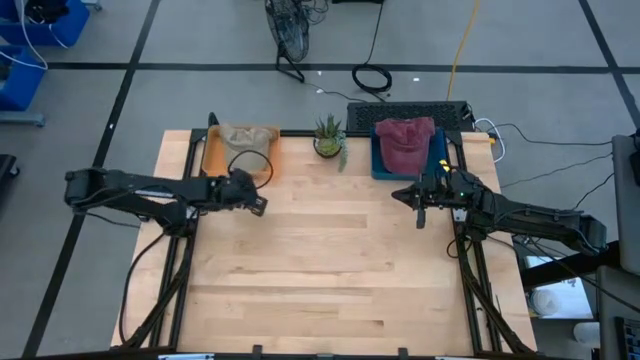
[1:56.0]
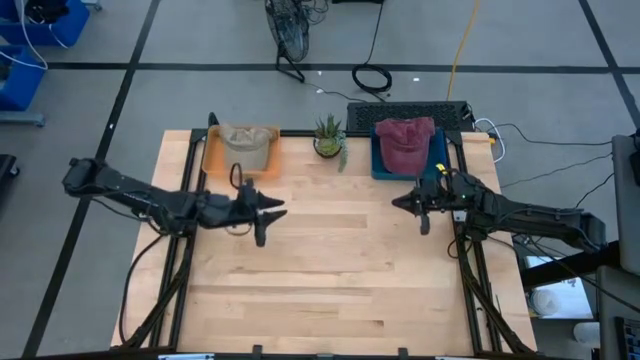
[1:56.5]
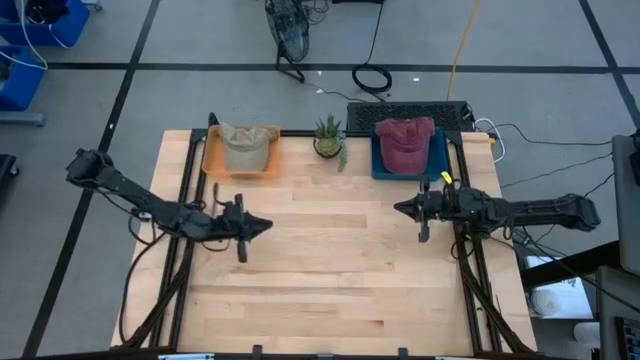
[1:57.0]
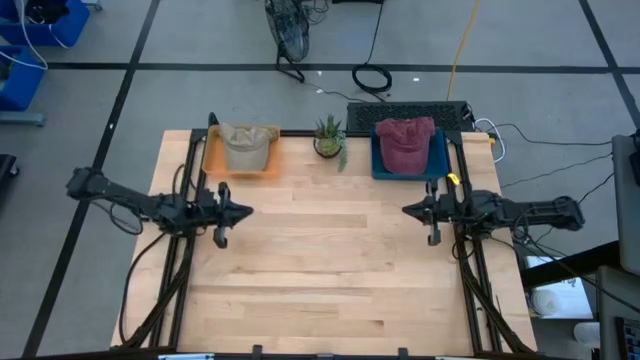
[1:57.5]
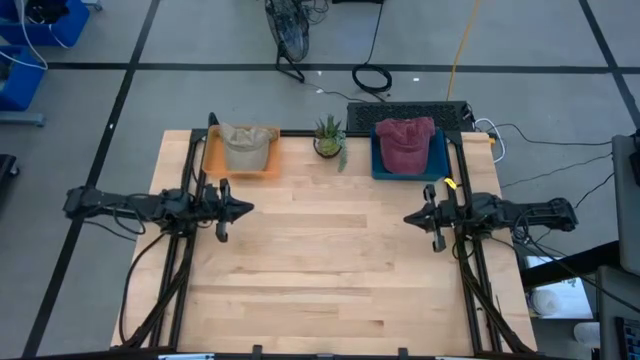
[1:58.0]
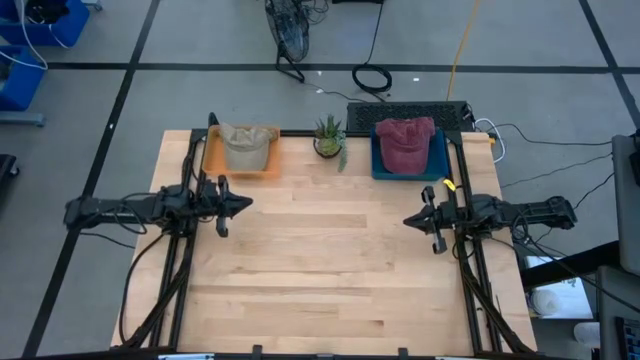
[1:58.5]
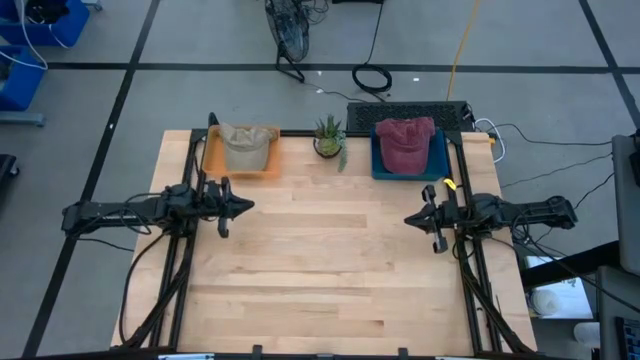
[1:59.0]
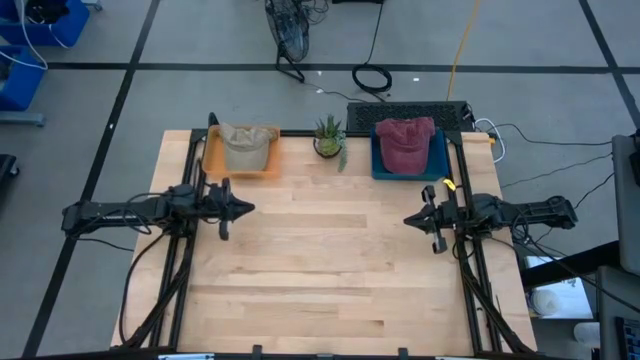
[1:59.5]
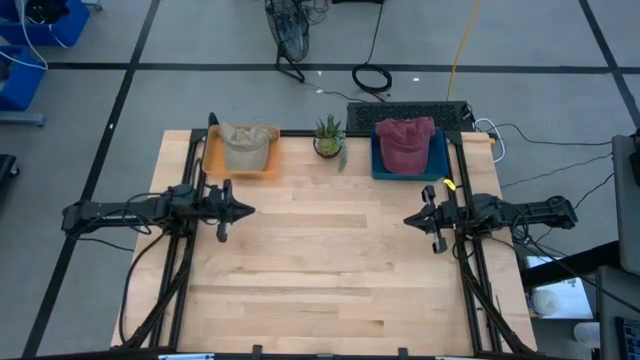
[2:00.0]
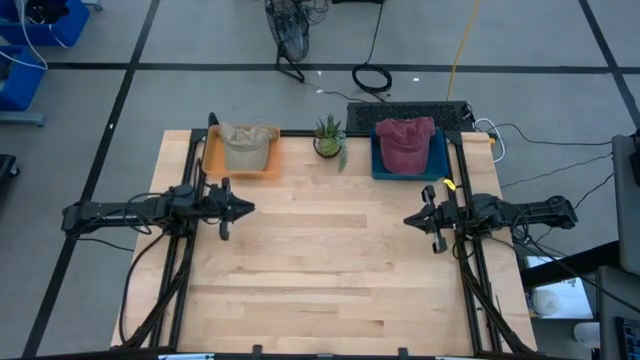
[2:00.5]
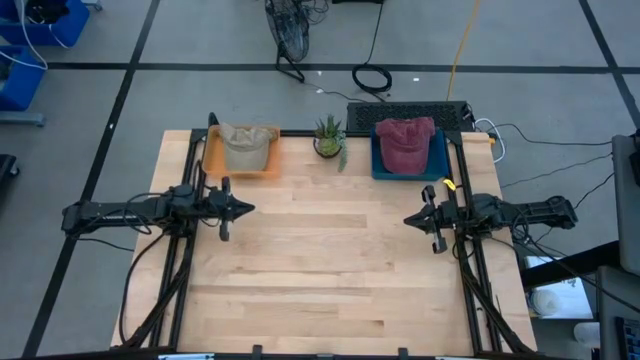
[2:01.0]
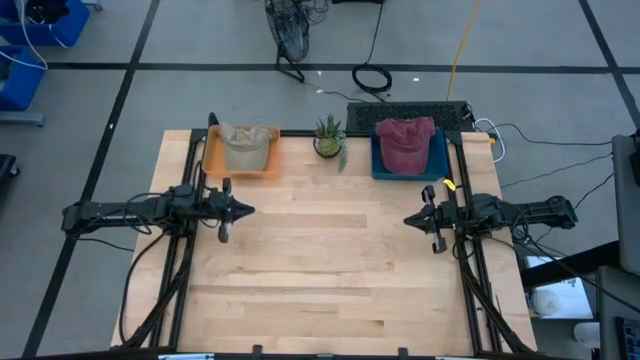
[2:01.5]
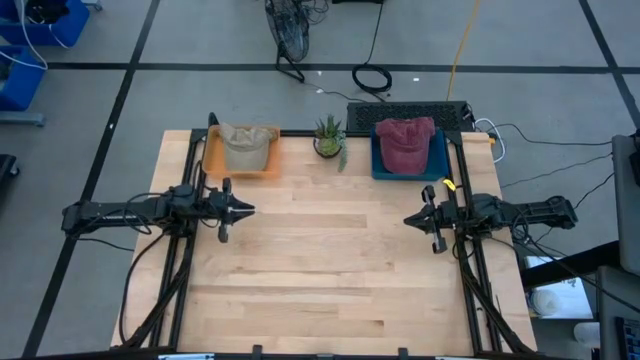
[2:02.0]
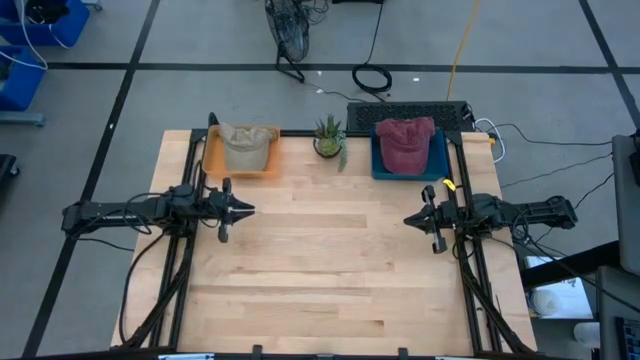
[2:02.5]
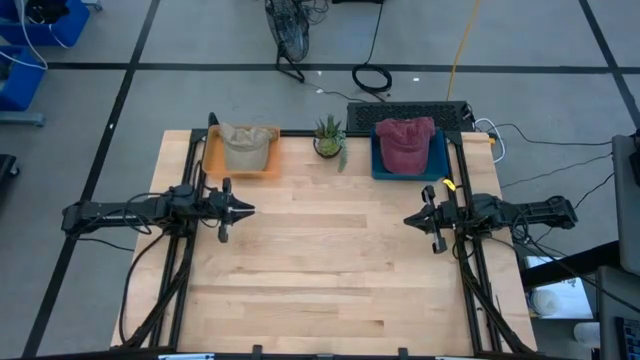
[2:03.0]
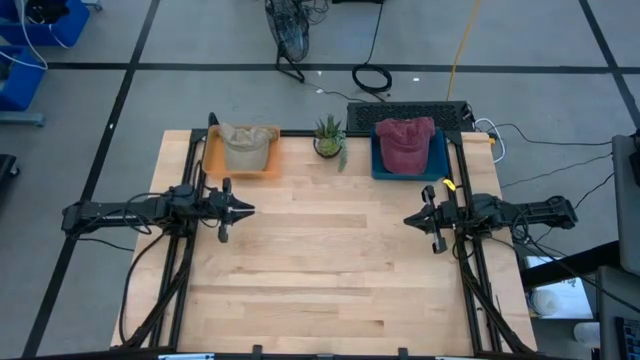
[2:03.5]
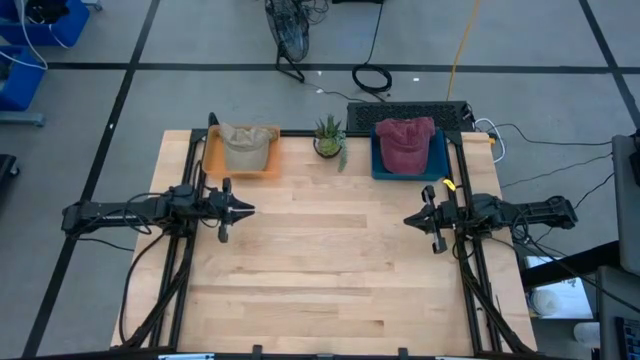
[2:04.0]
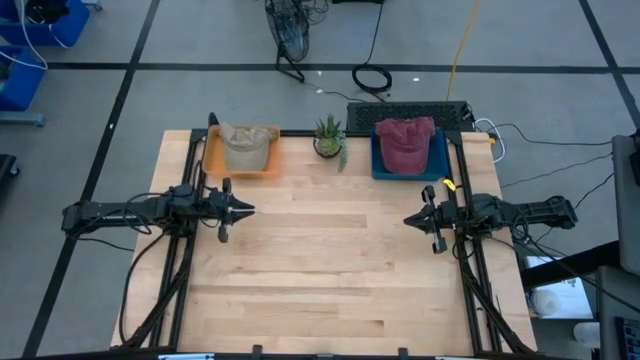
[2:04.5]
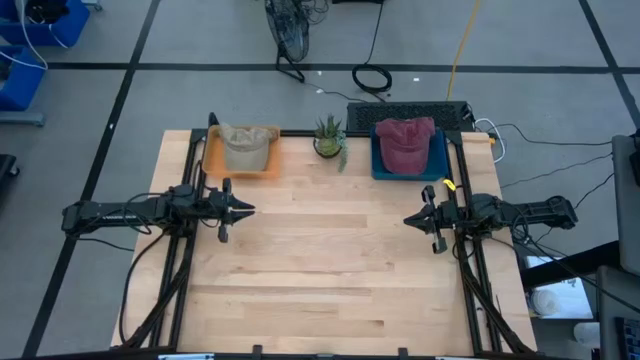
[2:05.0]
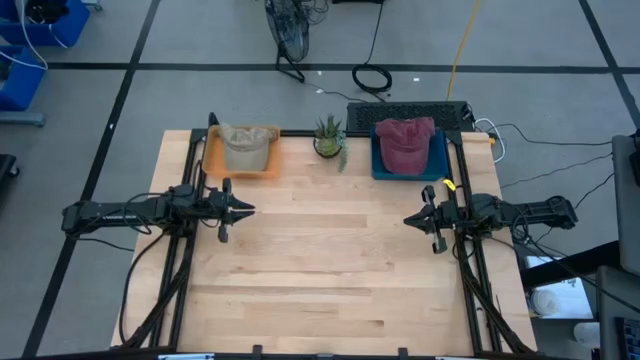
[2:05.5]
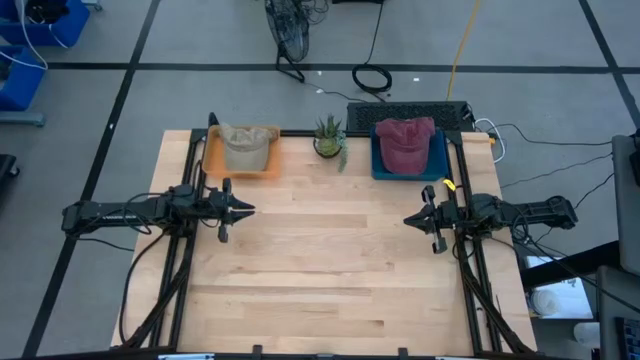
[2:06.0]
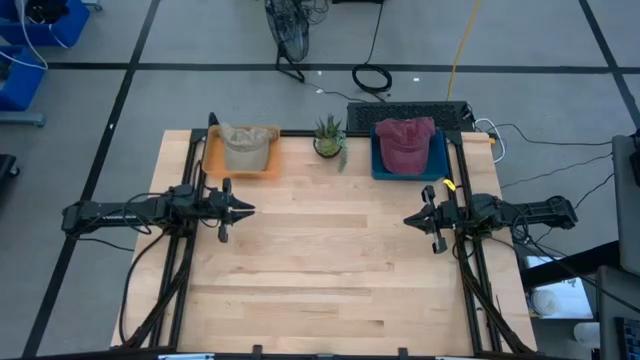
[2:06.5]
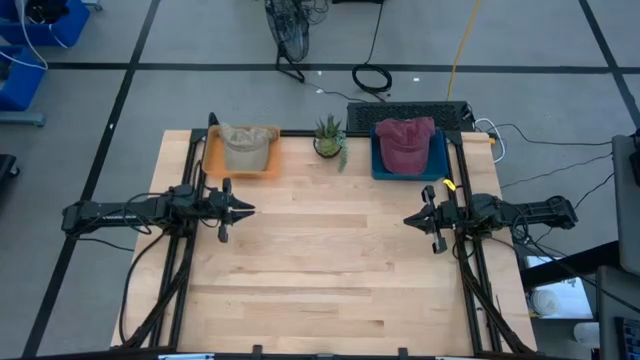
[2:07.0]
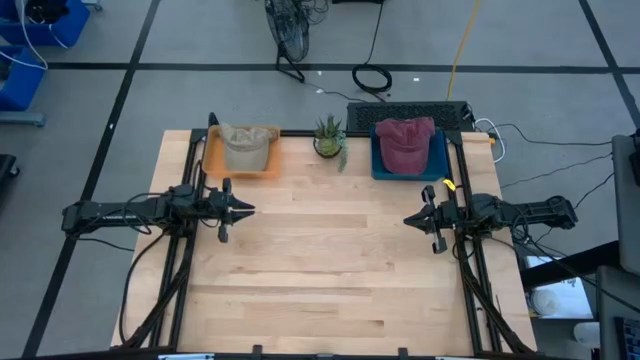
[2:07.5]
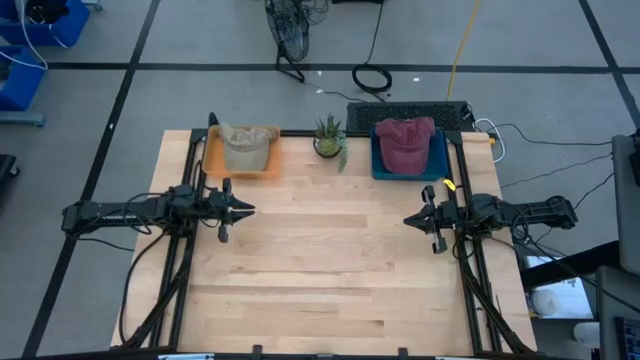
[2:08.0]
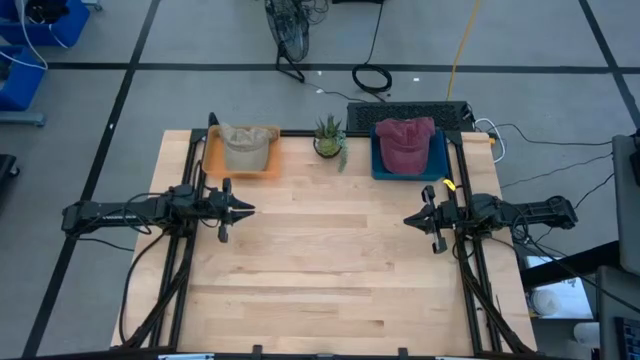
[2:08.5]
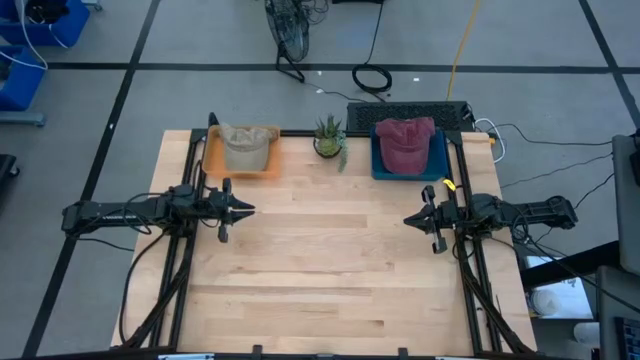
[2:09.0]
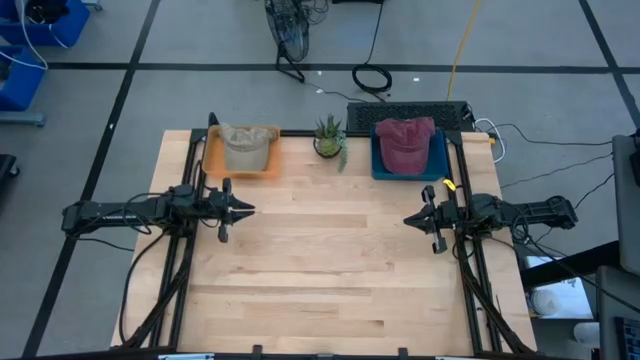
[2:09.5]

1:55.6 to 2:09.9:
Task: Pick & Place hat
Return to Home Position

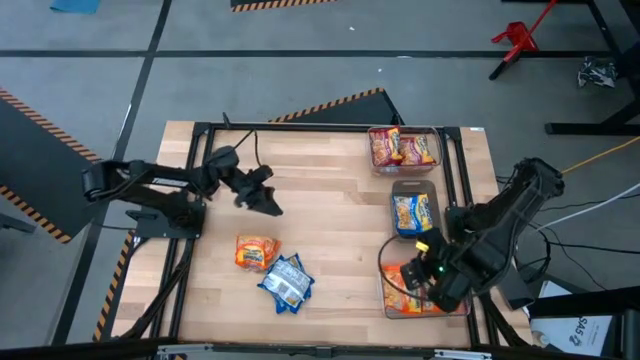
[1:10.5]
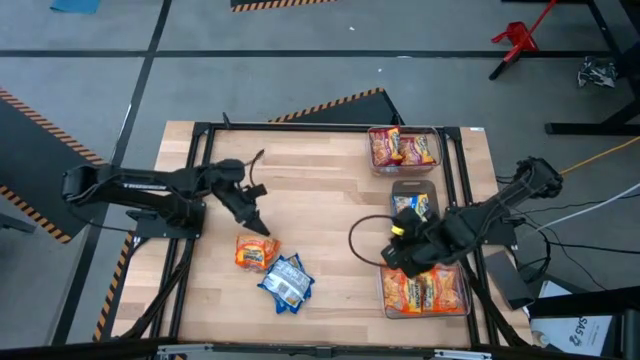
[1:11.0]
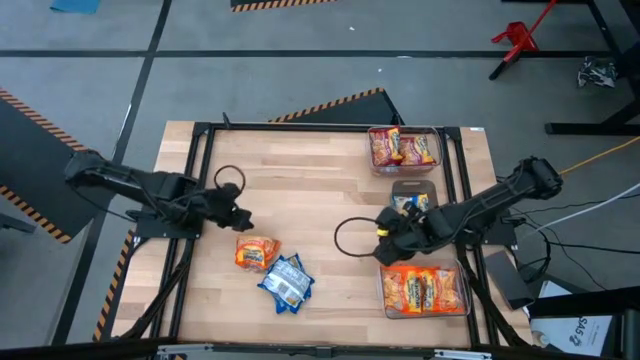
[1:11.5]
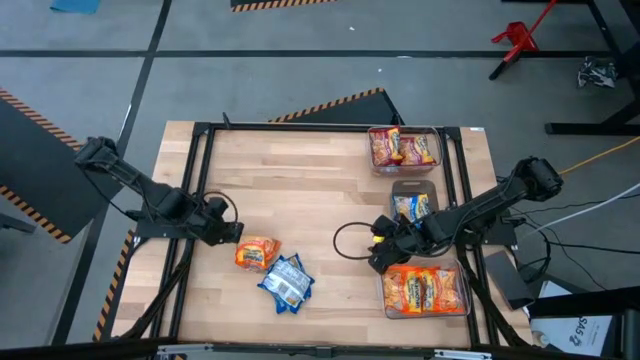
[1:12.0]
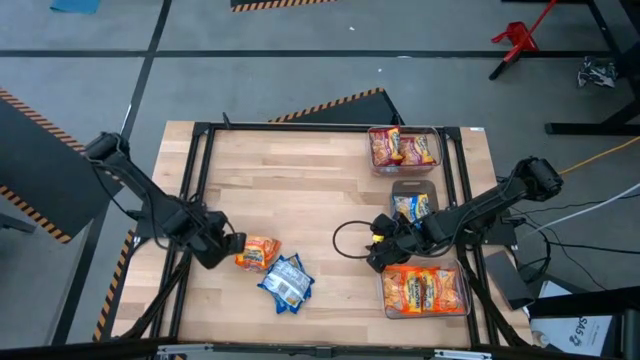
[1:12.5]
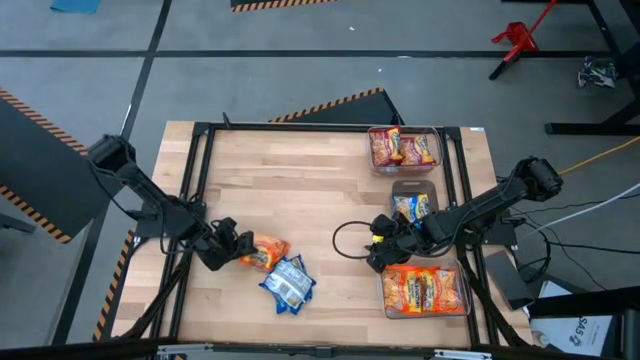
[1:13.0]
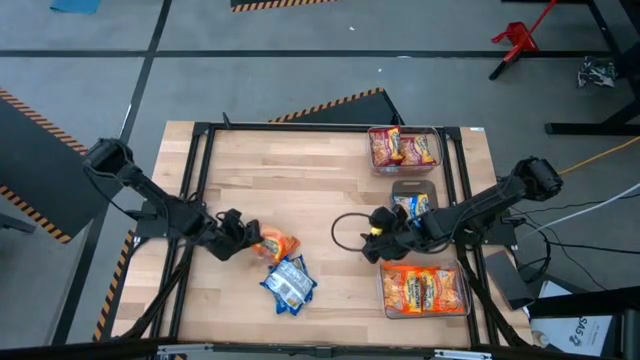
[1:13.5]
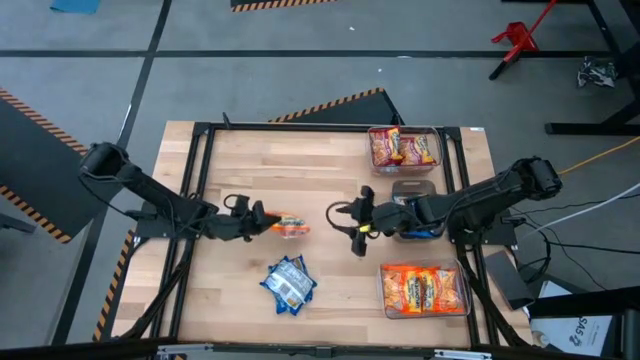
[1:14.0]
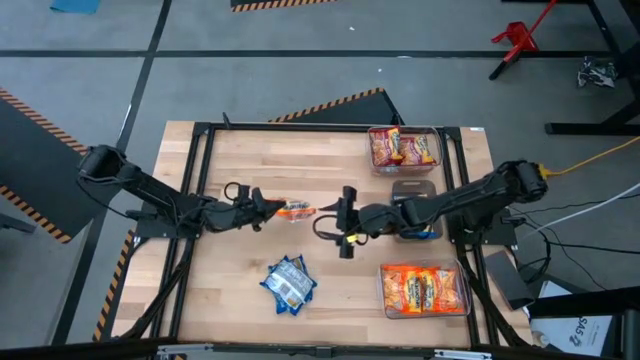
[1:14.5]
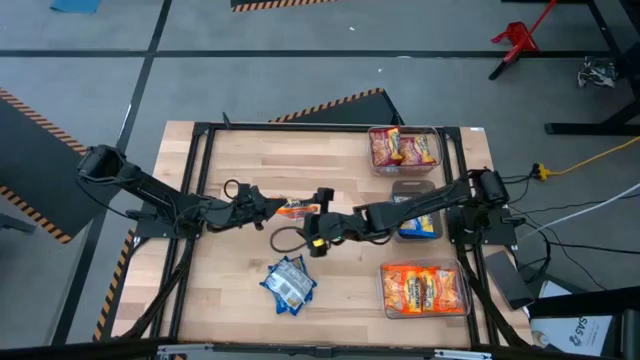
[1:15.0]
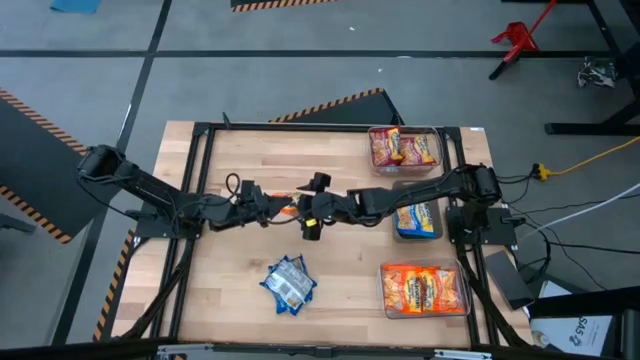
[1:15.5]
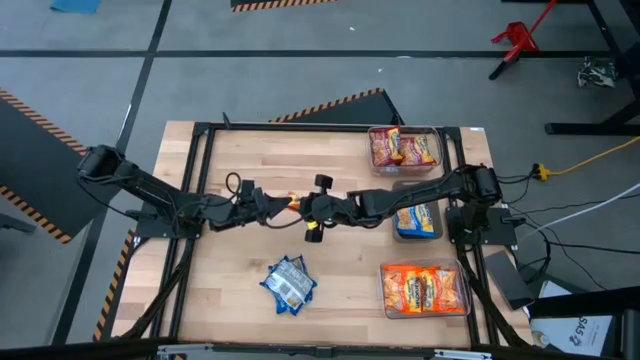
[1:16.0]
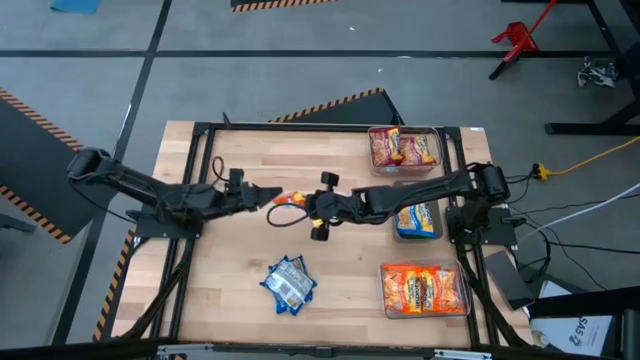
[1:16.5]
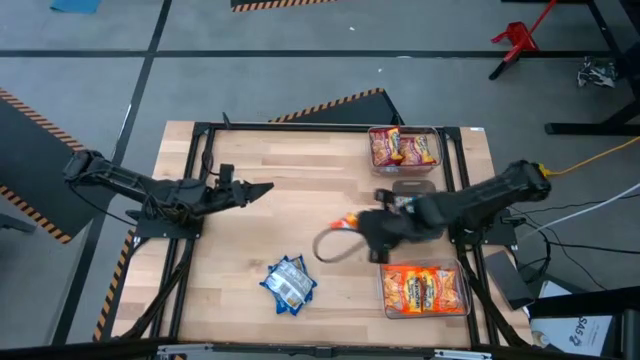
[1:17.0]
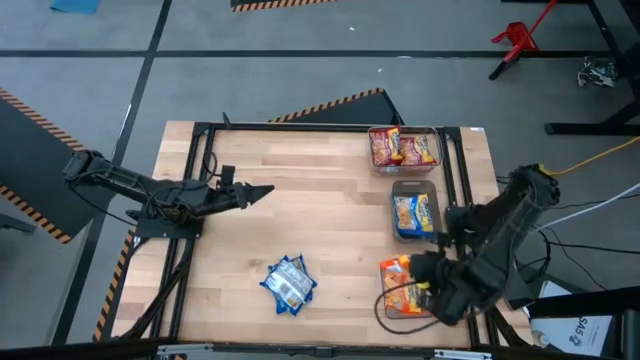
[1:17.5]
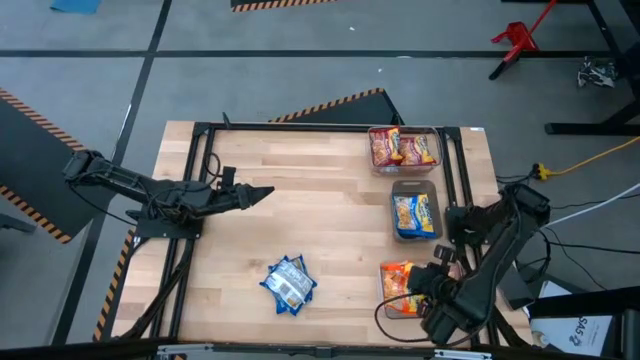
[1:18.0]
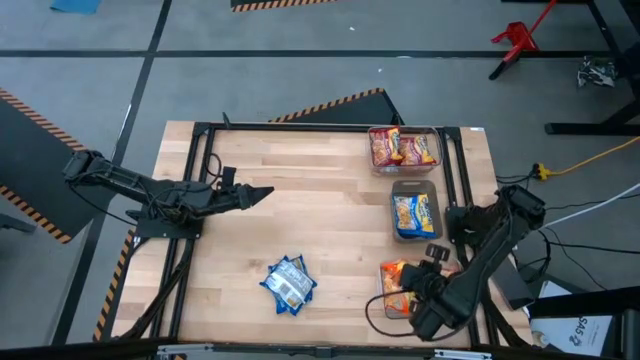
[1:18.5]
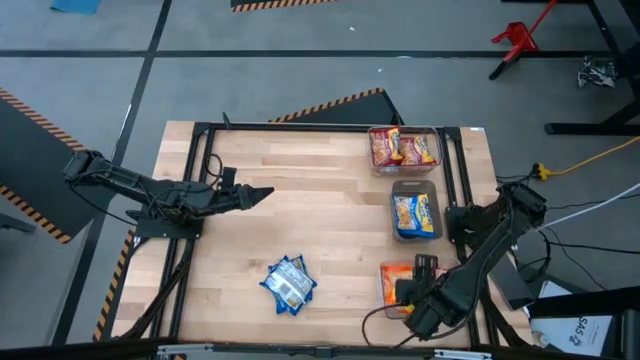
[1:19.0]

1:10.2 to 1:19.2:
Task: Sort Maruchan noodles
Put the orange noodle pack into the bottom transparent bin
